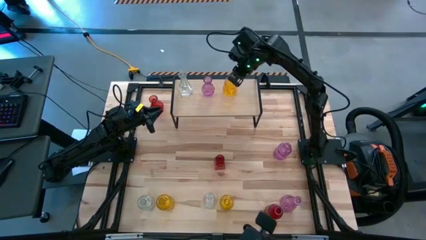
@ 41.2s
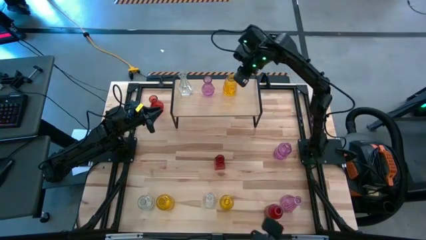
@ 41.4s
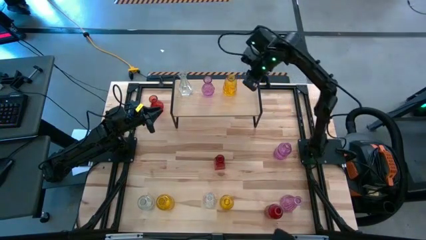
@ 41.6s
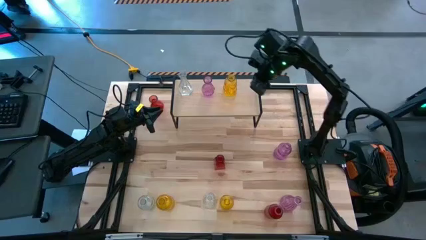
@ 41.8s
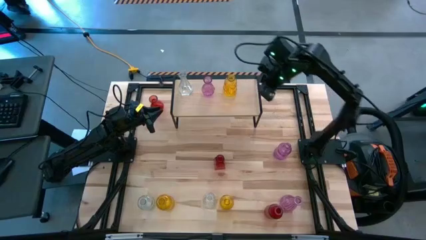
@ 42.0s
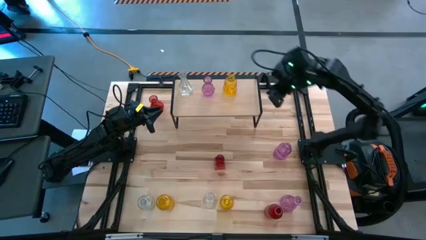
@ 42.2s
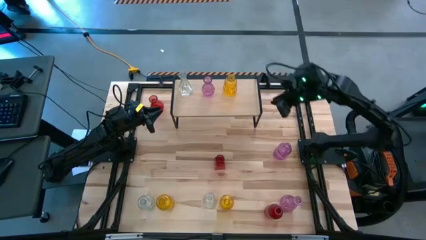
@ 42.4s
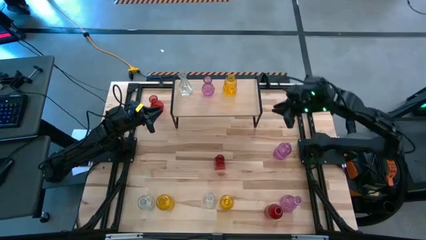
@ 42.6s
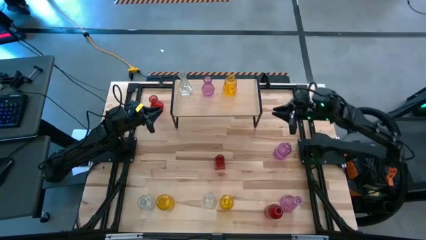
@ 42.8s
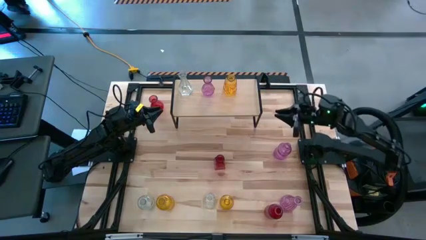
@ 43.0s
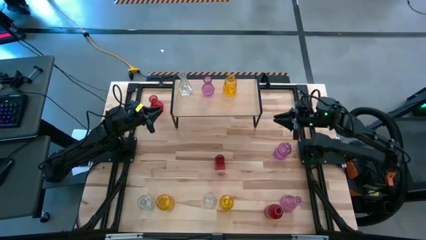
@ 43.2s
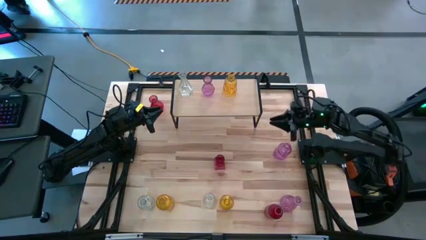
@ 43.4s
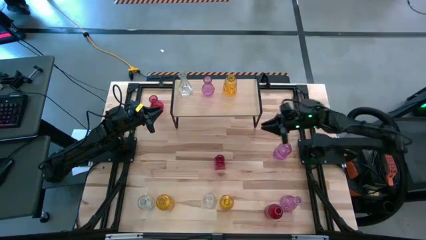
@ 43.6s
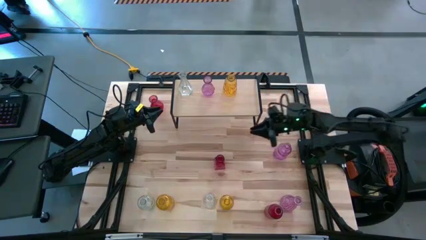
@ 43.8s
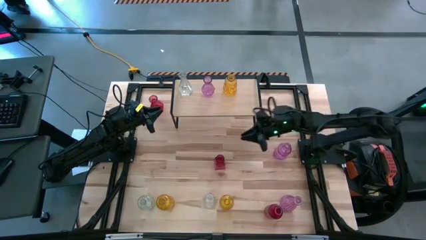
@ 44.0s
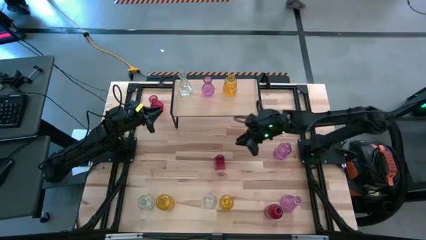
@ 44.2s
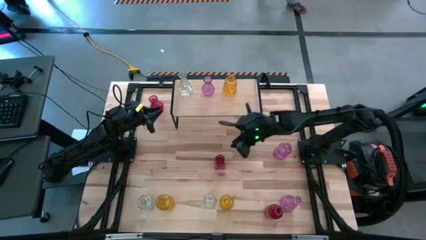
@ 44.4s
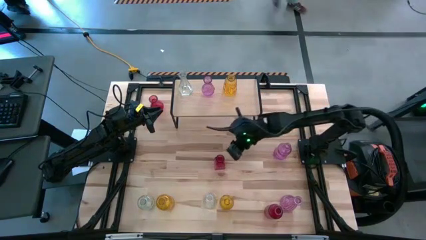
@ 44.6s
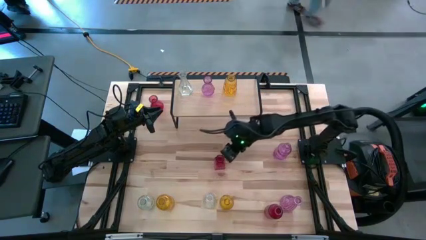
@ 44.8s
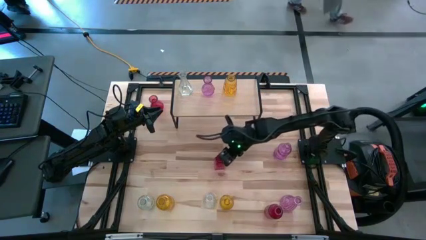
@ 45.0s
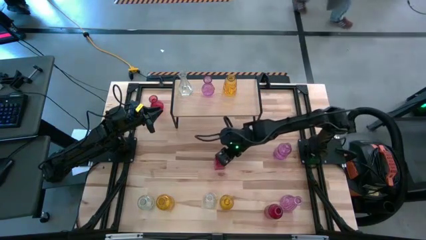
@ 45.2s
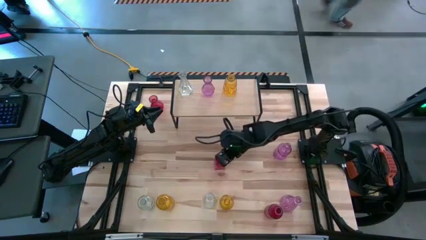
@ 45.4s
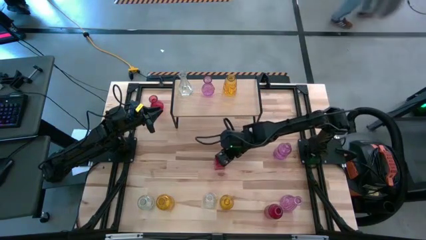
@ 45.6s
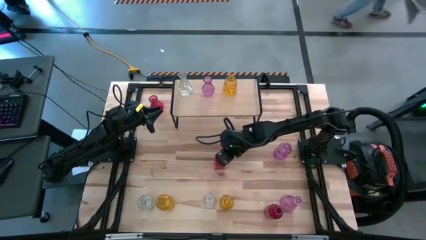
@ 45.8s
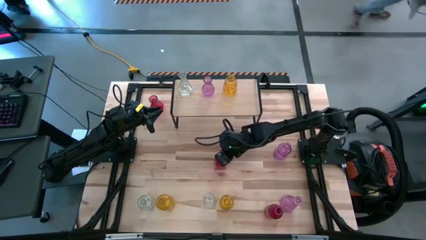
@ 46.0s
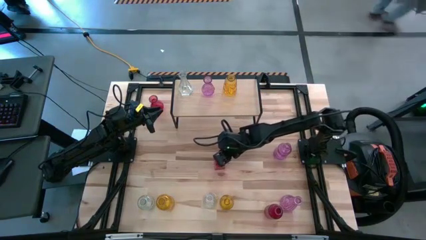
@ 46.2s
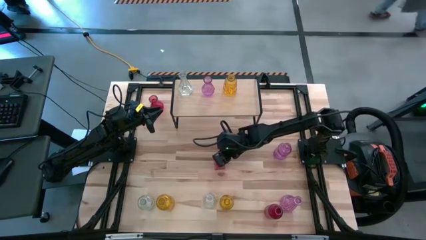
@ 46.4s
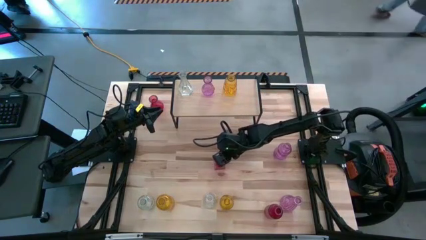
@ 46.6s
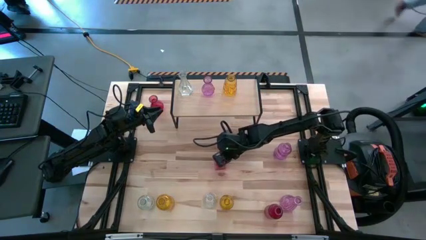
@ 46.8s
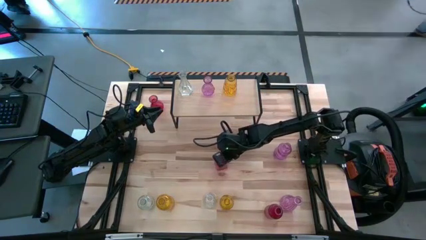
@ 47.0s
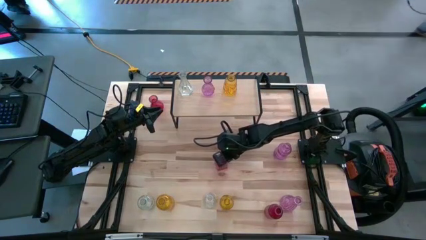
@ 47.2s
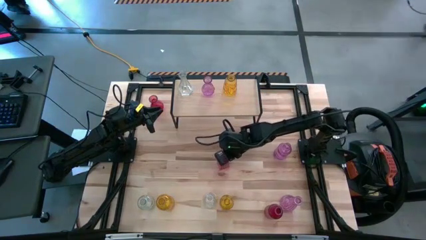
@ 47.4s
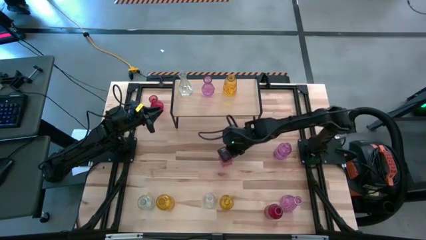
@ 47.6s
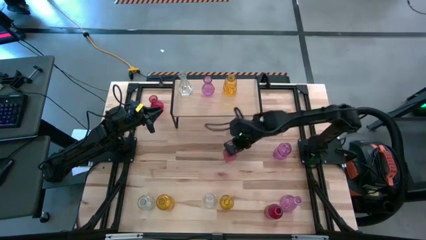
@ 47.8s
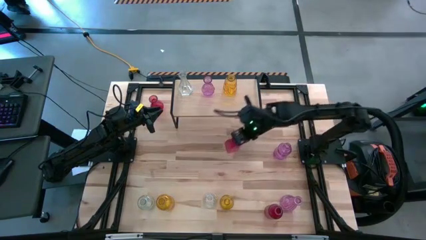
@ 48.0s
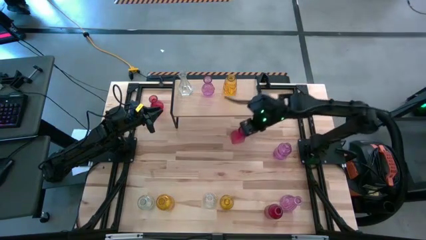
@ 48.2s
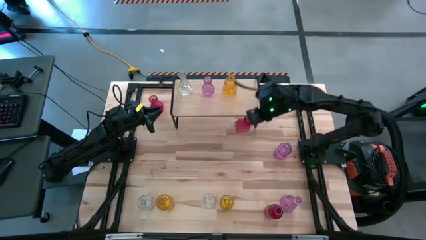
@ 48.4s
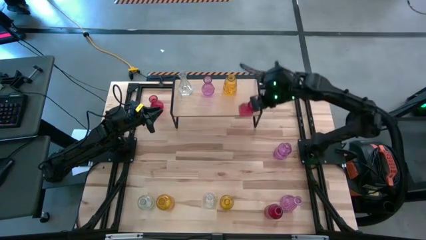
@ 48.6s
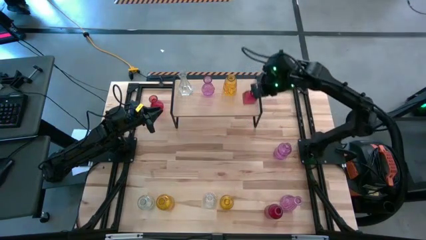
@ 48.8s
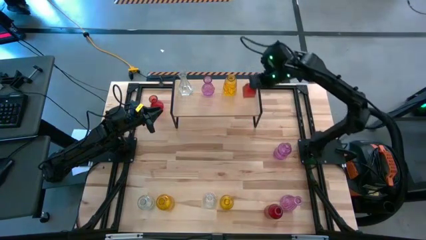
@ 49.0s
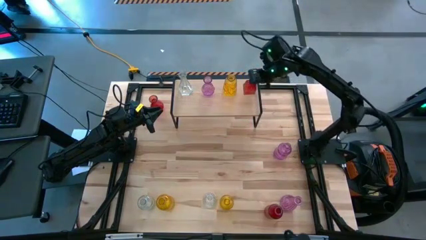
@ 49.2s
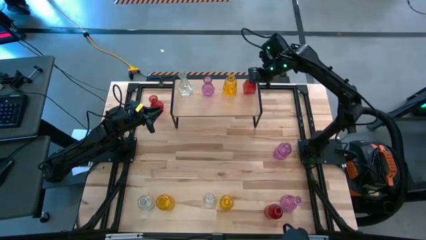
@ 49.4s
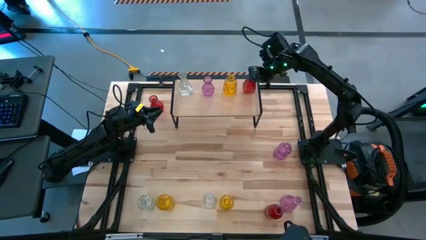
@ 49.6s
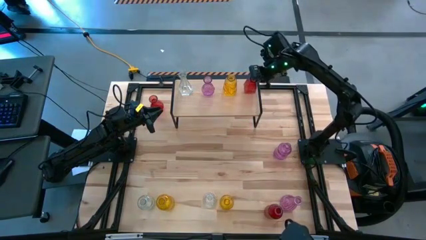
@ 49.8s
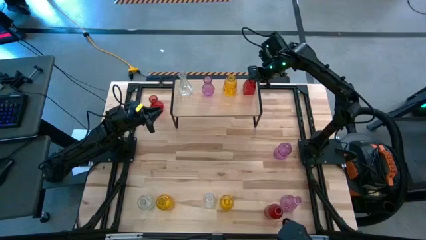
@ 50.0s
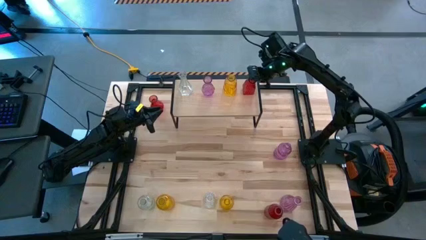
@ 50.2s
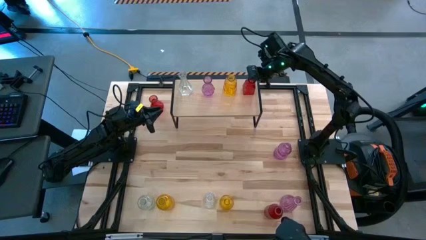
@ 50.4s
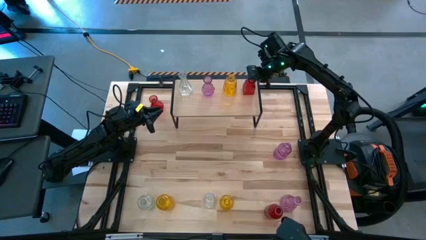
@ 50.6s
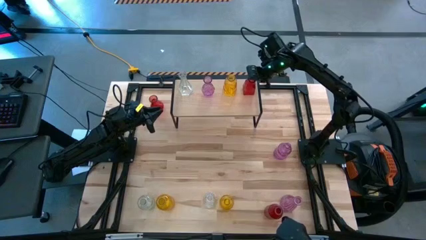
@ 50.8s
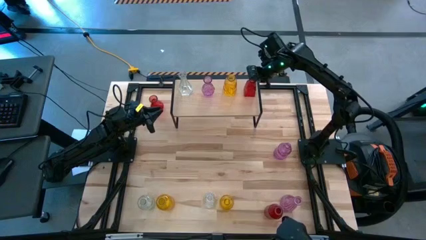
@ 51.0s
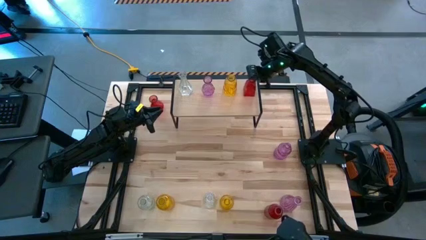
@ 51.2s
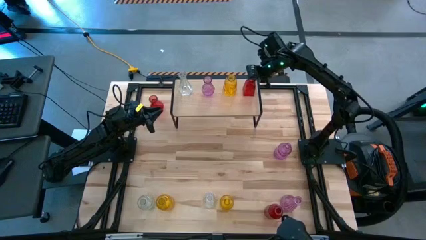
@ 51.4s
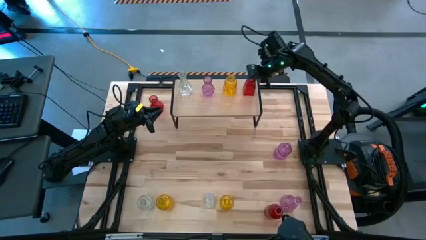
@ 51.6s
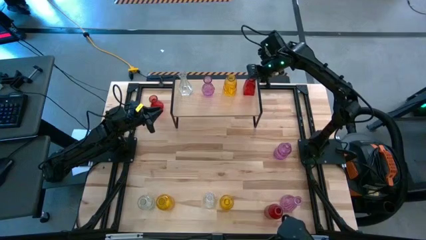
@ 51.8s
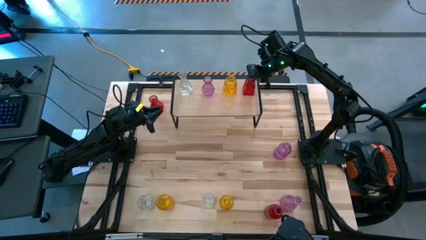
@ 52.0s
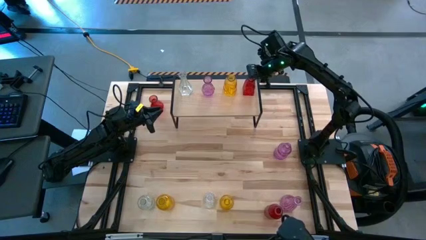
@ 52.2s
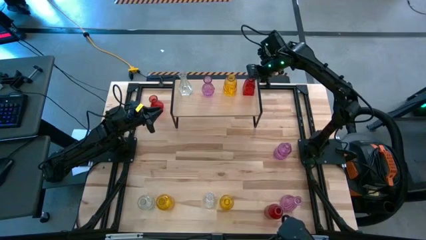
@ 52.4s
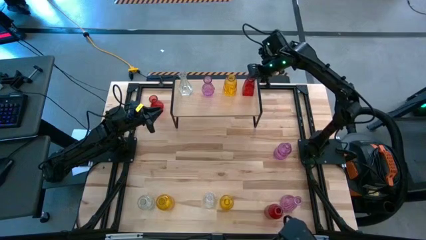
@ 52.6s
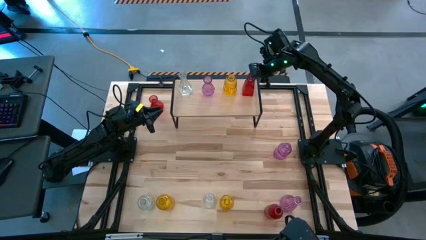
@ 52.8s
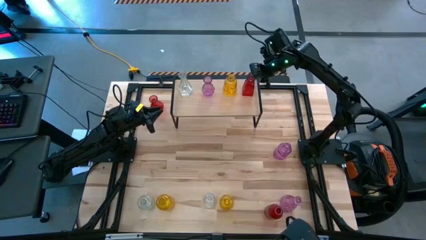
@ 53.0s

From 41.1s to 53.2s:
Task: sort vases onto shelf
Put the middle red vase on the shelf

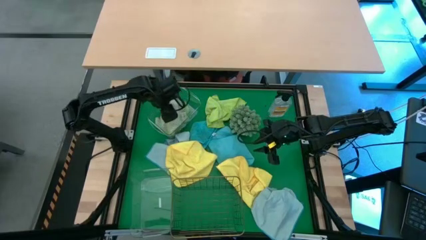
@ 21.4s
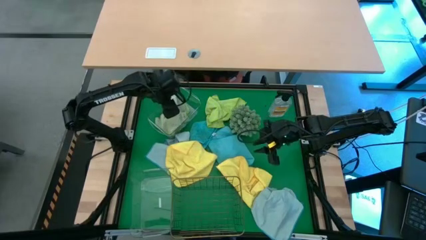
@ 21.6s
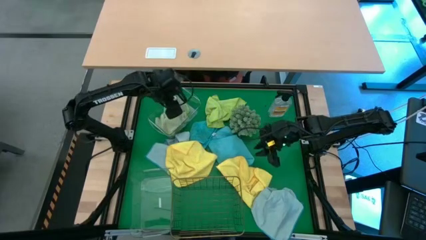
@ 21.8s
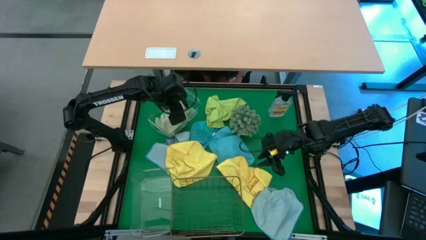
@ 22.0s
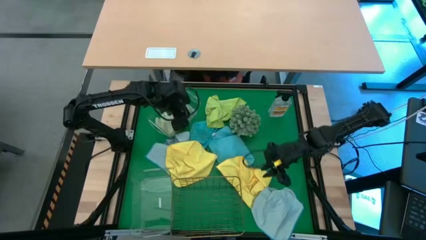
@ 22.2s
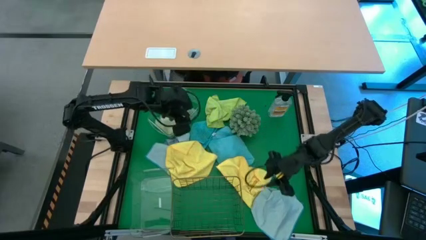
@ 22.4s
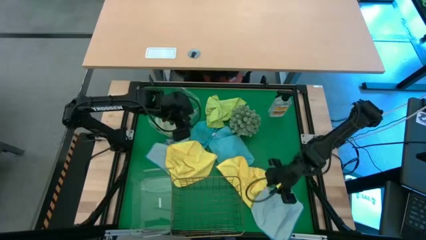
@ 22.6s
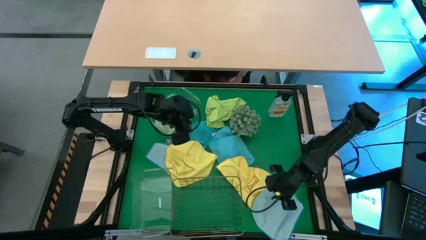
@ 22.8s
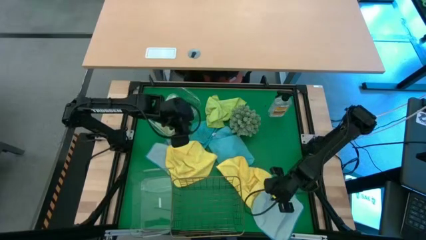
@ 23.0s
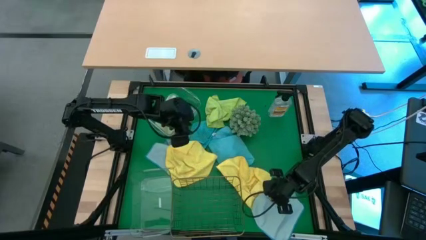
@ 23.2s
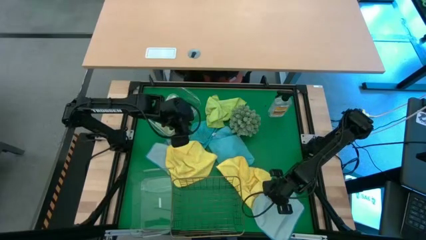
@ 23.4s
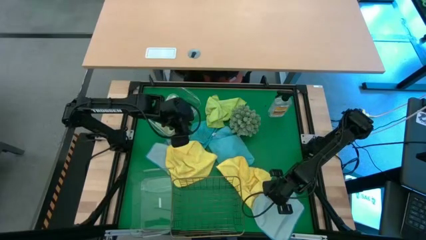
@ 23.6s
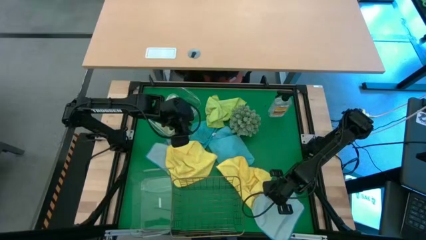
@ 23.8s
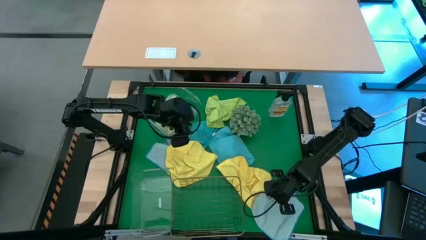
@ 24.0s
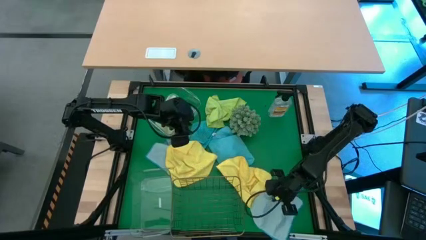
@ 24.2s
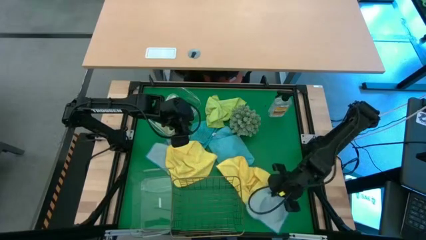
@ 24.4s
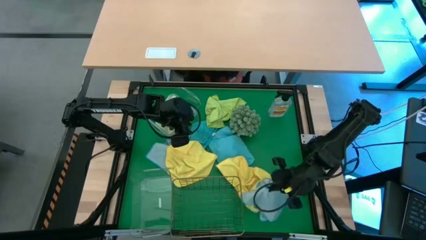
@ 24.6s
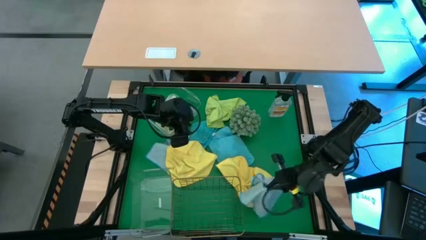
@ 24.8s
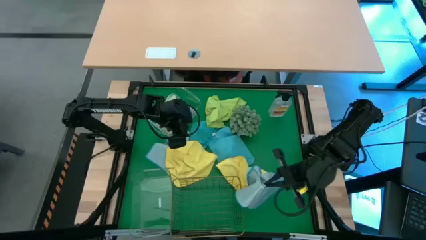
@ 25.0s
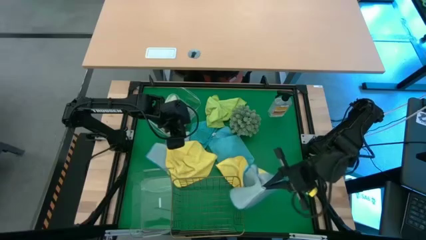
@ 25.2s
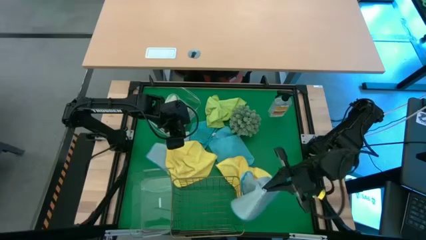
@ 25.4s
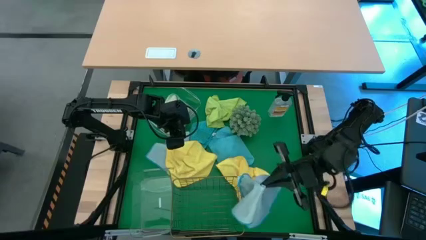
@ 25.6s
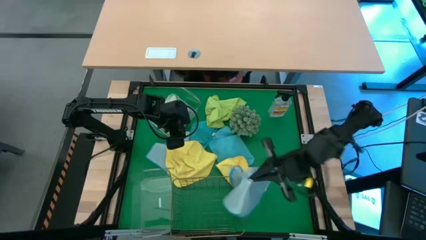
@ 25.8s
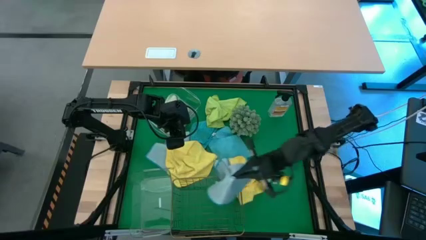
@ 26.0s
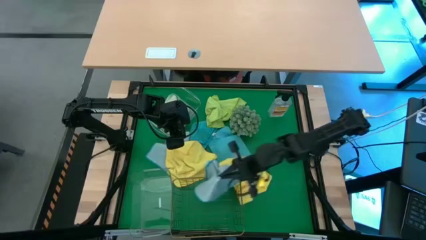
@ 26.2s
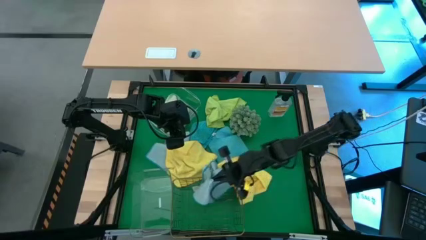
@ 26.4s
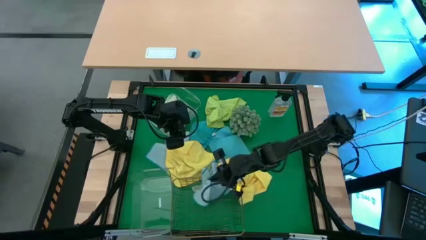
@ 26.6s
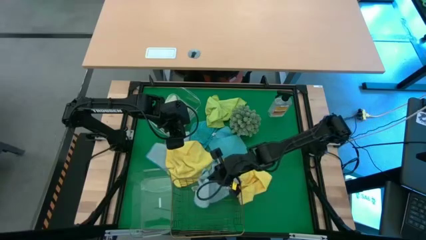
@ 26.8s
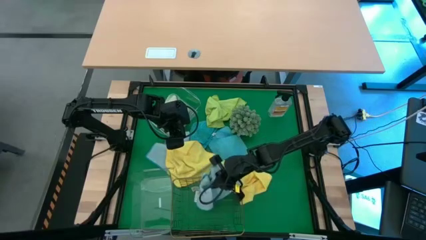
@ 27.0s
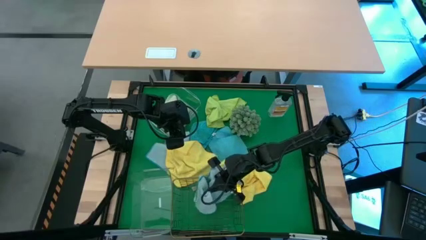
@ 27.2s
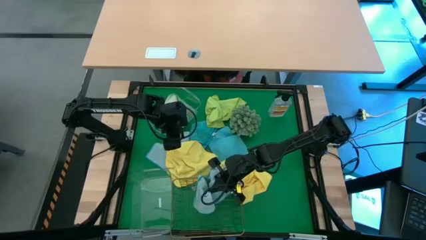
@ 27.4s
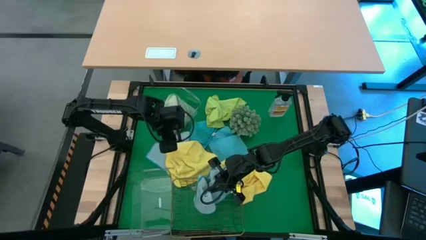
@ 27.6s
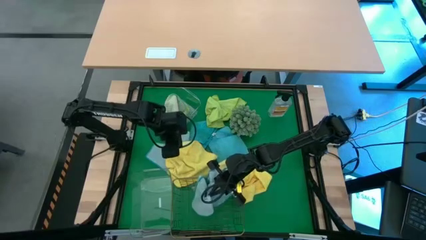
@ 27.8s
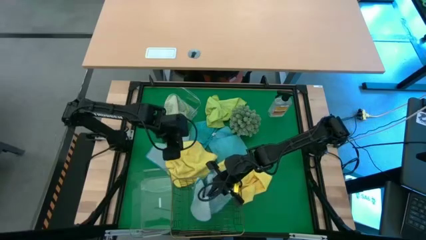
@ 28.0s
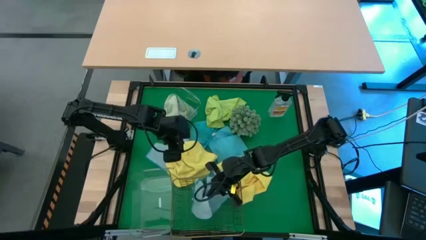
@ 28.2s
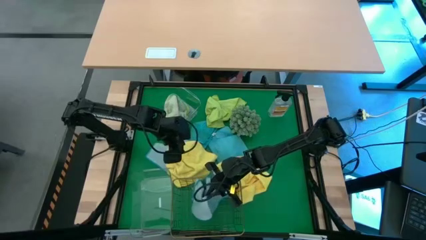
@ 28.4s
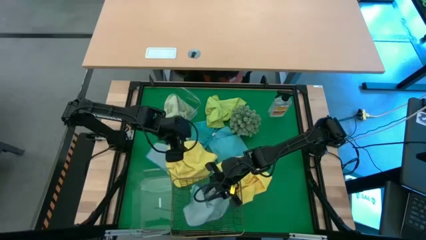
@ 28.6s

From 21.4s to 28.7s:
Task: Sort microfiber towel by color & place in baskets
Put the bottom light blue microfiber towel into the wire basket
